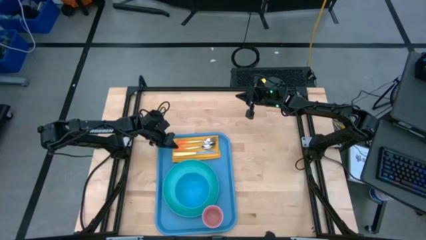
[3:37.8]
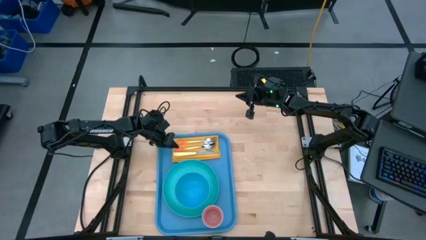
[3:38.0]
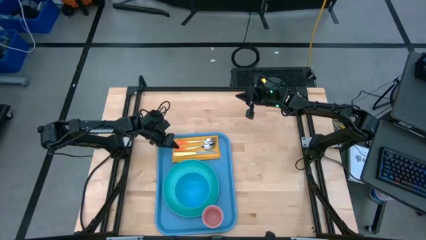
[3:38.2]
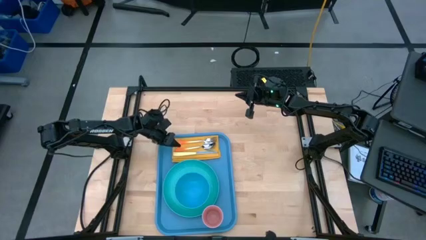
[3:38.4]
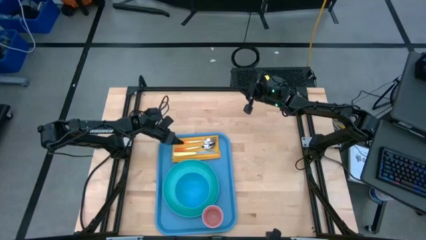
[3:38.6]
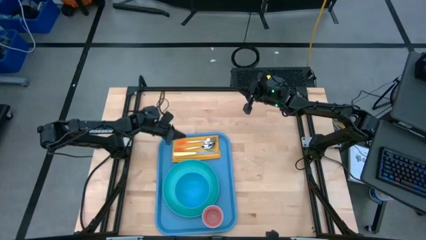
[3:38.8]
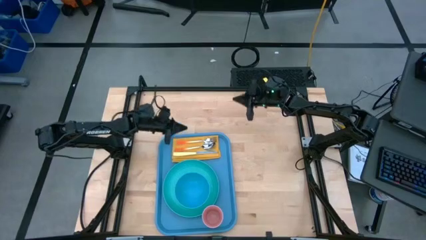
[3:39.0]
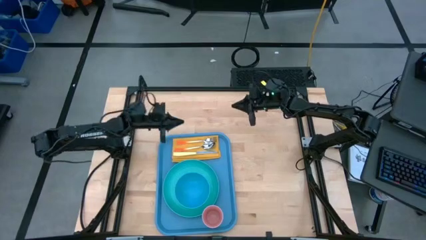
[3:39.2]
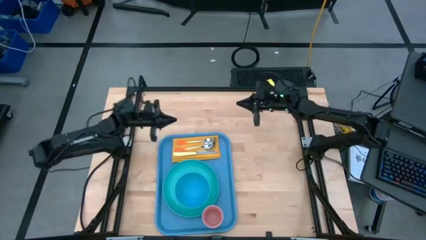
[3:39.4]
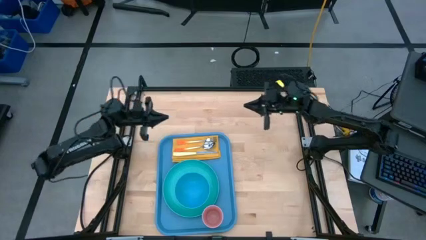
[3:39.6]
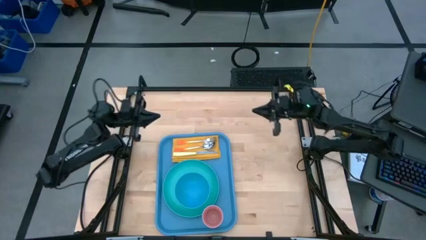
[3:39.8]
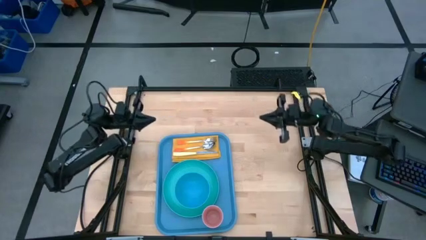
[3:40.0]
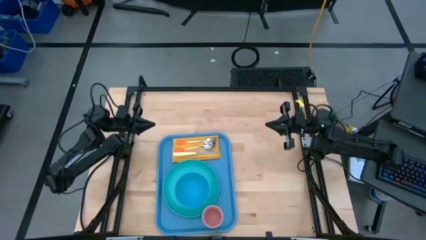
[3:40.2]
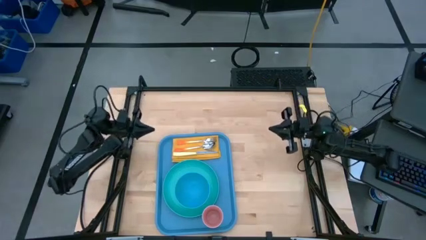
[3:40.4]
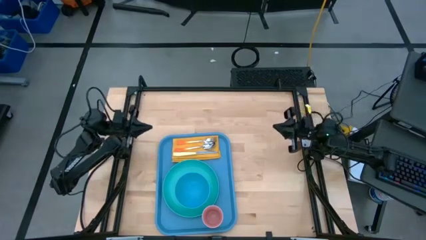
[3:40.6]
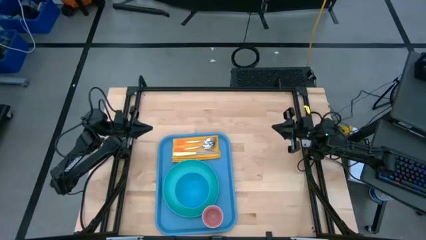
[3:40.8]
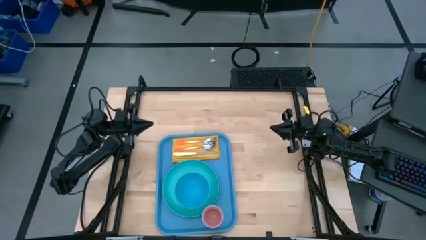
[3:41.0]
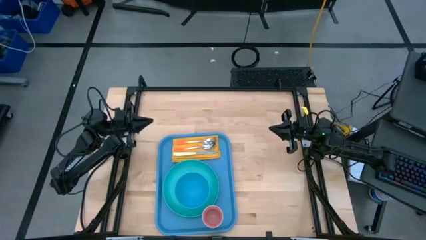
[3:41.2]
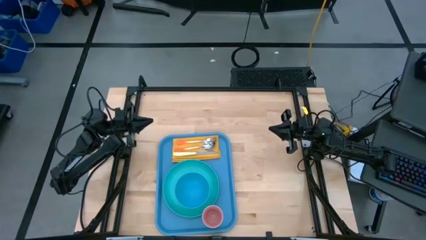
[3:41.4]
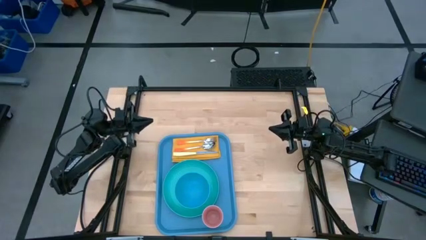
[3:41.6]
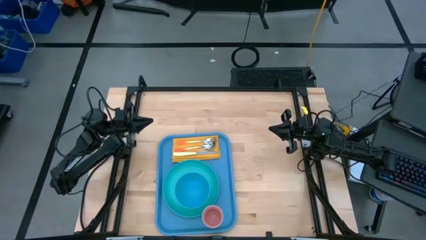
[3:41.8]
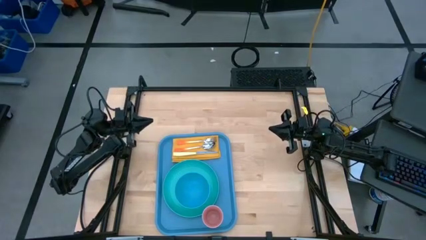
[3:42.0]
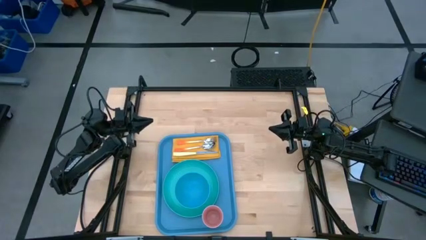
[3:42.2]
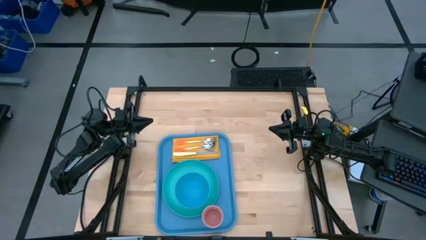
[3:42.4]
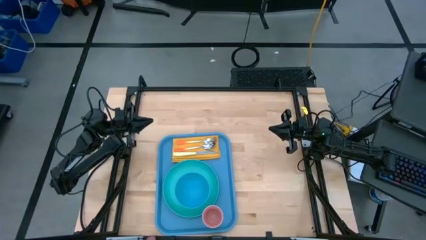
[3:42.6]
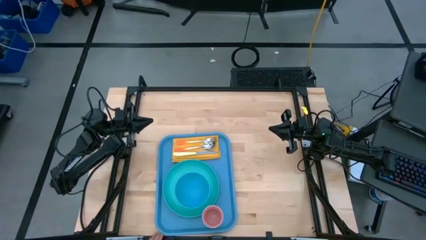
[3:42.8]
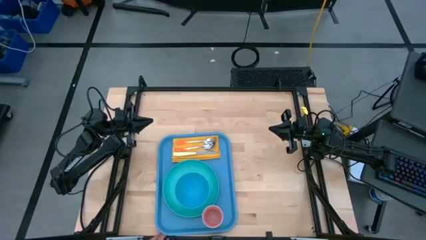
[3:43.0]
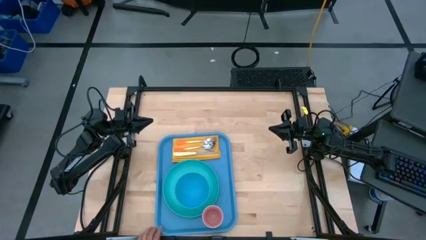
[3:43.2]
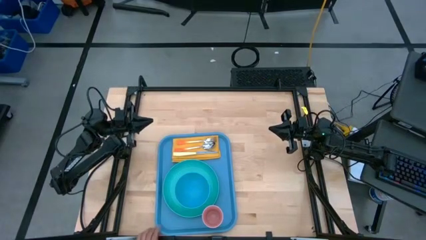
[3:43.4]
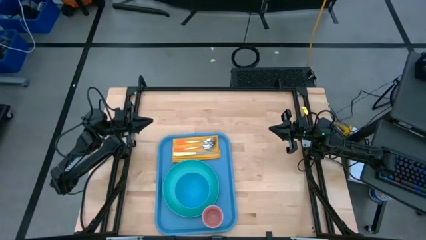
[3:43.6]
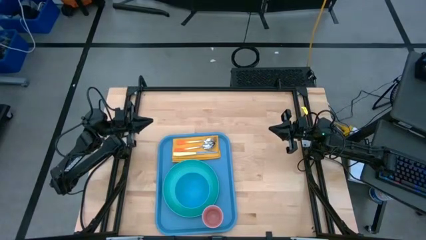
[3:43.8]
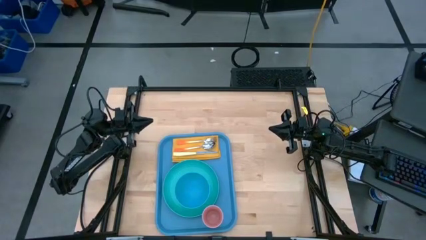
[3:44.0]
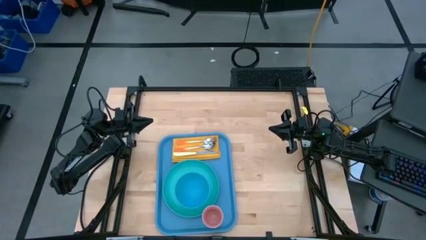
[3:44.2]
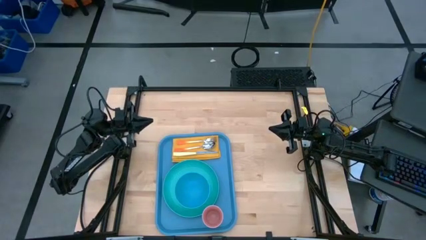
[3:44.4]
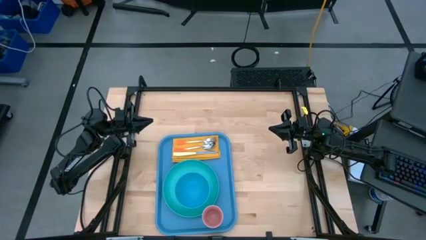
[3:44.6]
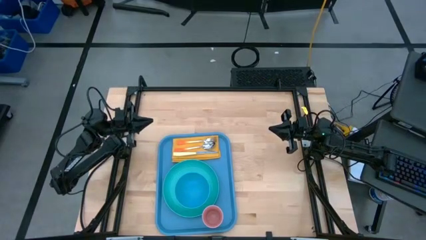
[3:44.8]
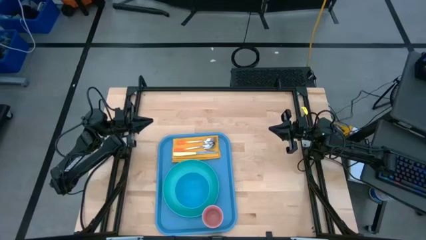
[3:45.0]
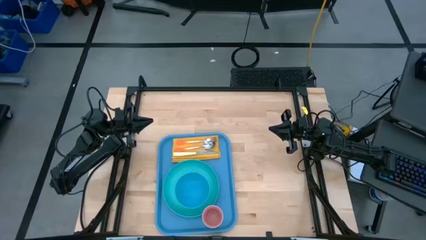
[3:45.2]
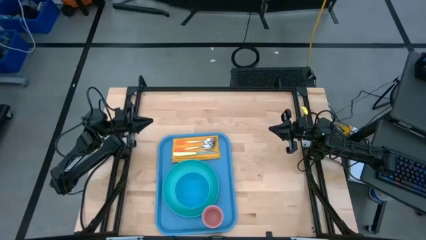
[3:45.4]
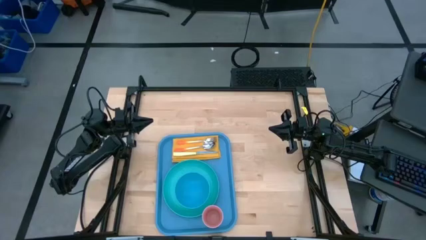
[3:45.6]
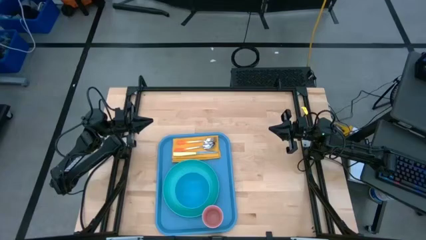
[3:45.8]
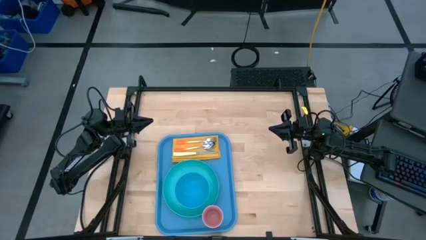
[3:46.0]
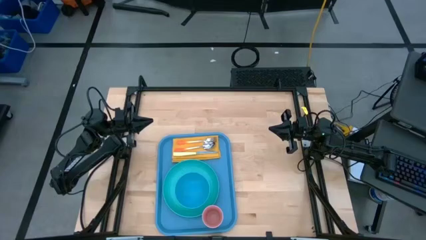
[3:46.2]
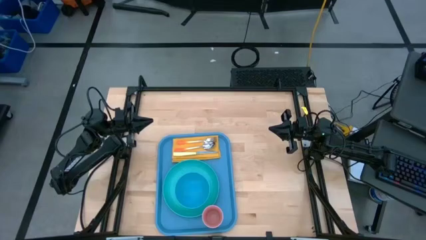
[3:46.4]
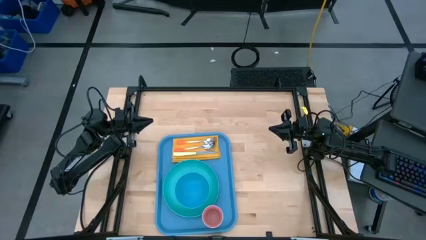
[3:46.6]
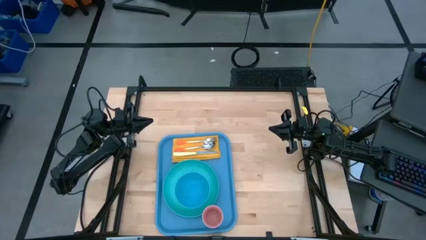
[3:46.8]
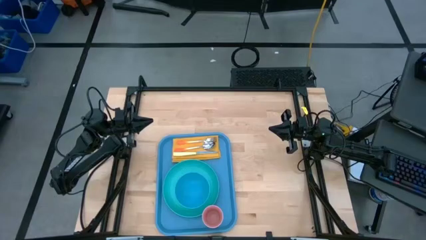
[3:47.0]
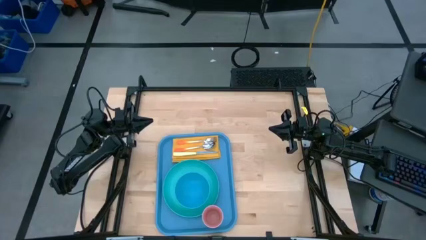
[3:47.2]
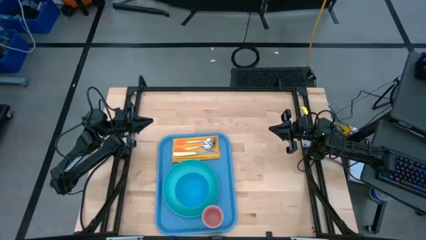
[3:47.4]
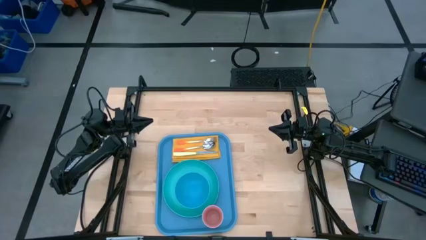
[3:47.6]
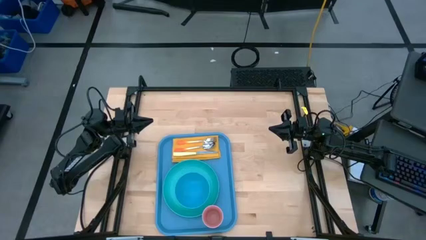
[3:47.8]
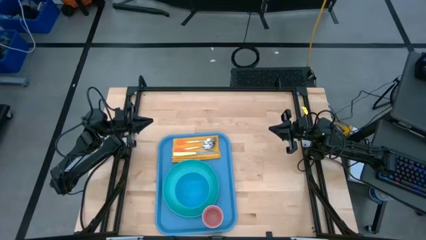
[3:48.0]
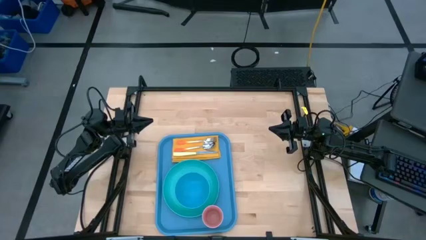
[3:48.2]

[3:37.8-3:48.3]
Task: Set up tray
Return to Home Position

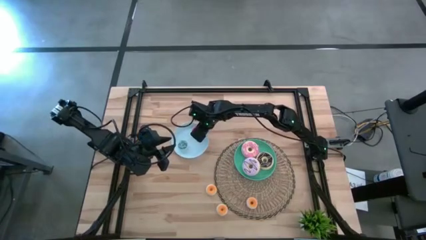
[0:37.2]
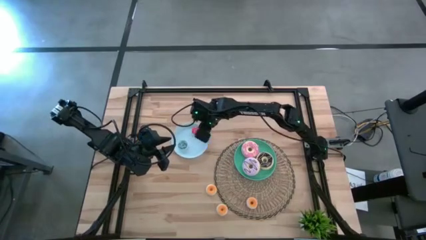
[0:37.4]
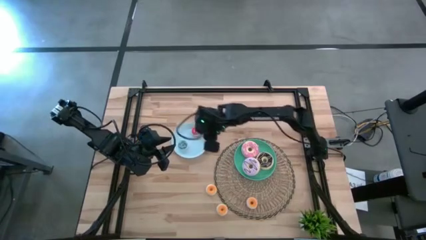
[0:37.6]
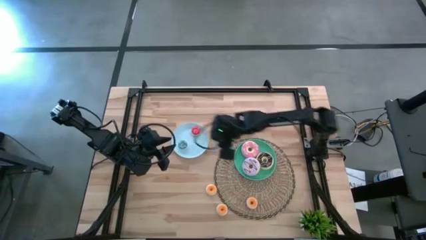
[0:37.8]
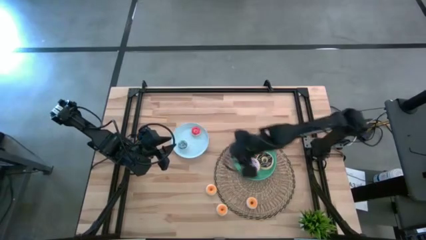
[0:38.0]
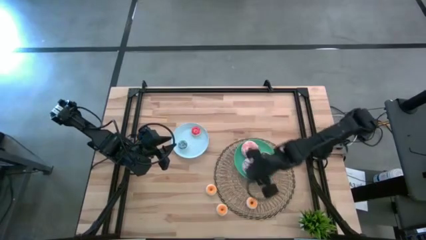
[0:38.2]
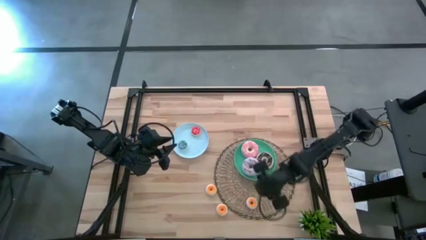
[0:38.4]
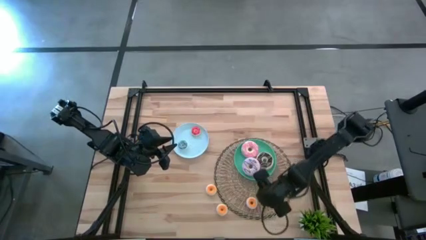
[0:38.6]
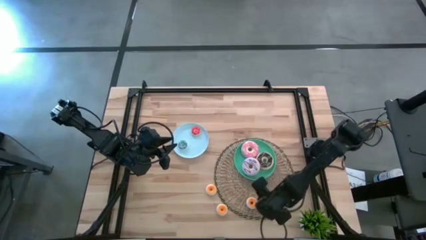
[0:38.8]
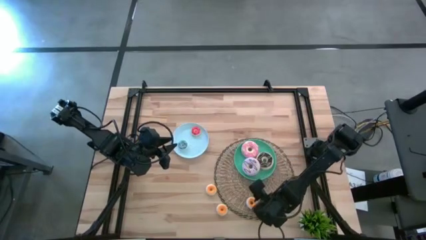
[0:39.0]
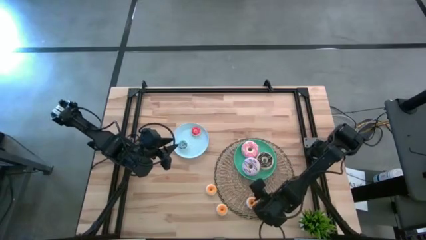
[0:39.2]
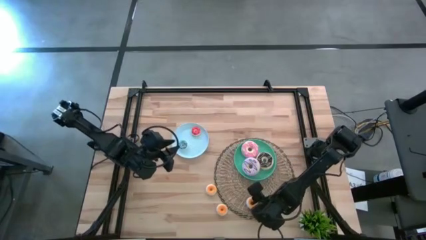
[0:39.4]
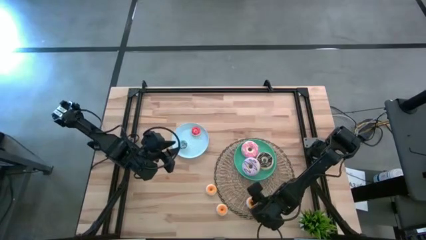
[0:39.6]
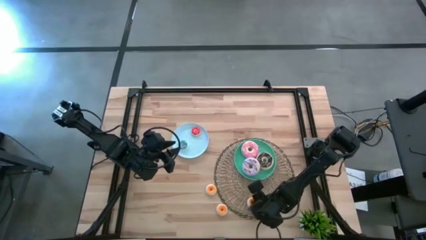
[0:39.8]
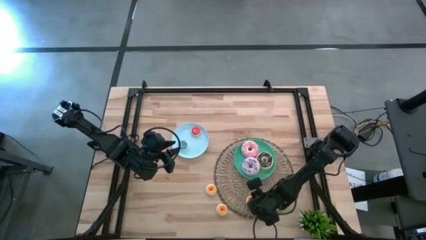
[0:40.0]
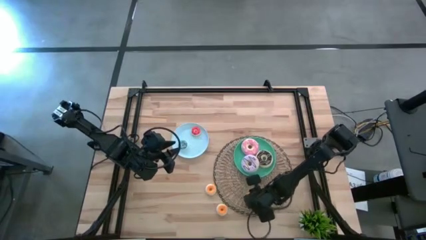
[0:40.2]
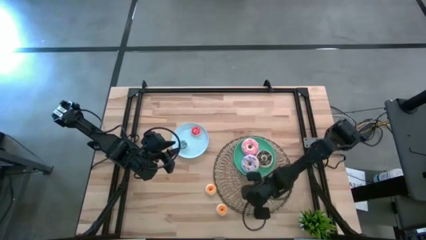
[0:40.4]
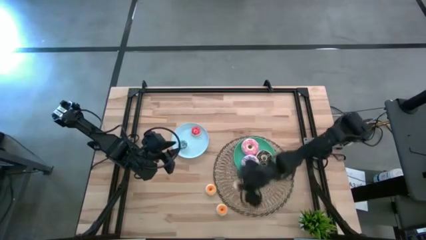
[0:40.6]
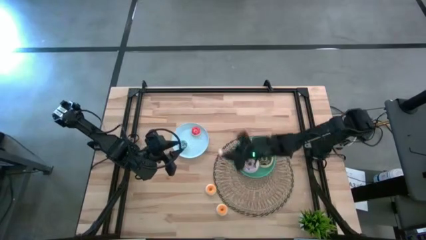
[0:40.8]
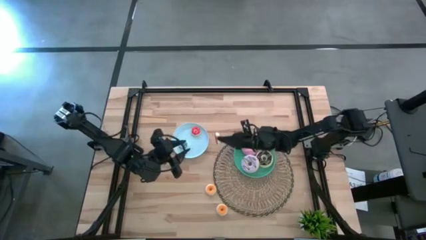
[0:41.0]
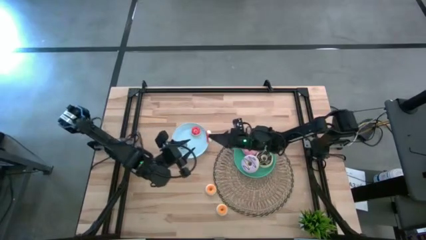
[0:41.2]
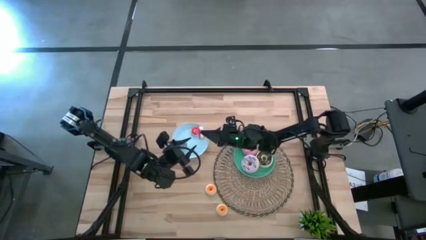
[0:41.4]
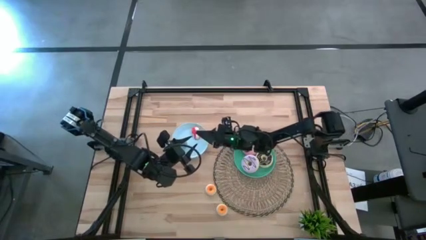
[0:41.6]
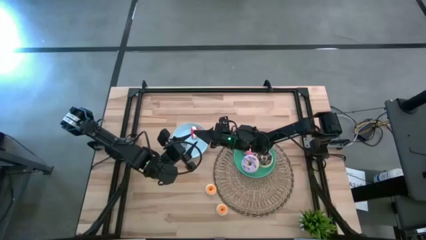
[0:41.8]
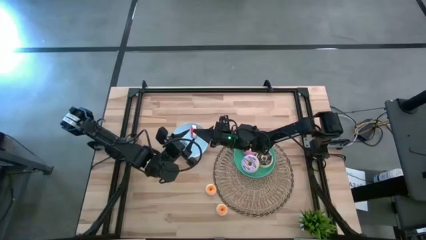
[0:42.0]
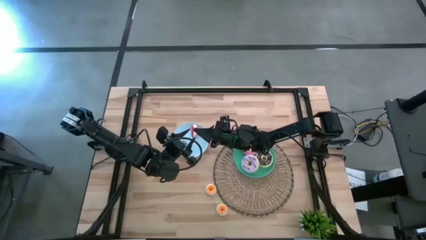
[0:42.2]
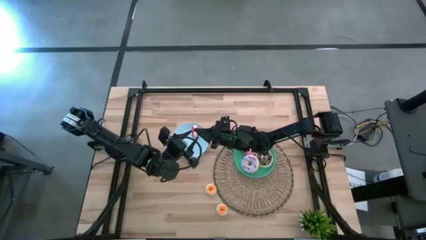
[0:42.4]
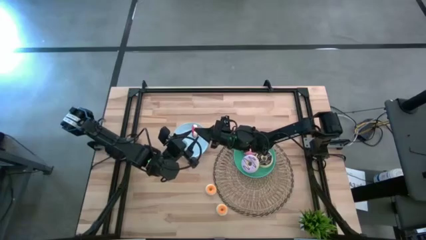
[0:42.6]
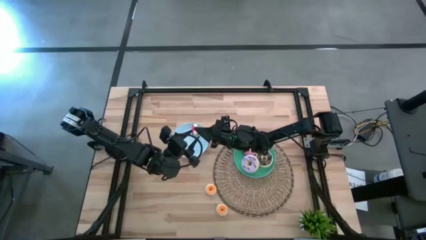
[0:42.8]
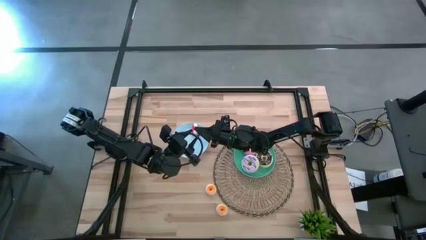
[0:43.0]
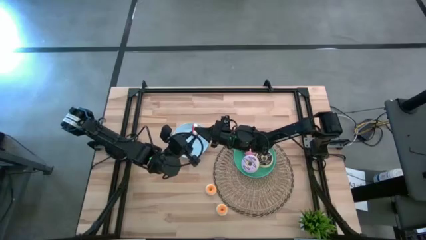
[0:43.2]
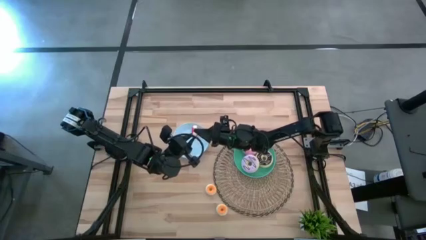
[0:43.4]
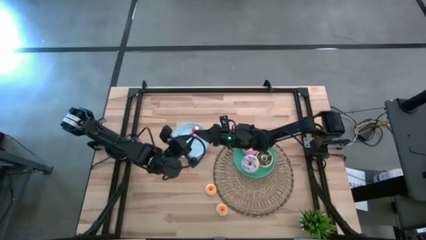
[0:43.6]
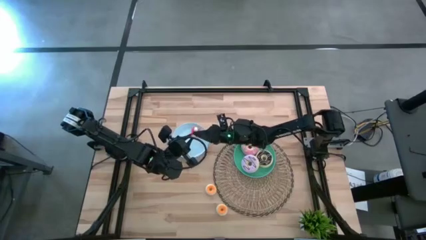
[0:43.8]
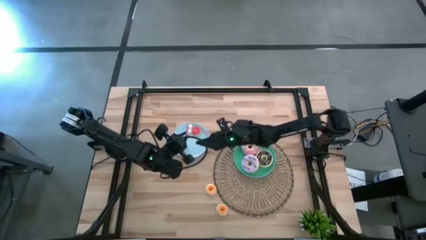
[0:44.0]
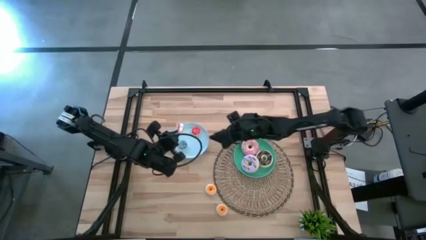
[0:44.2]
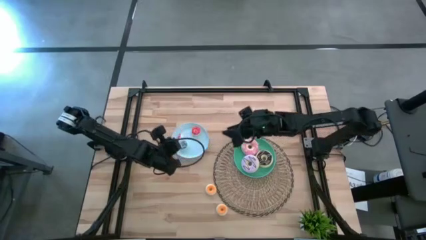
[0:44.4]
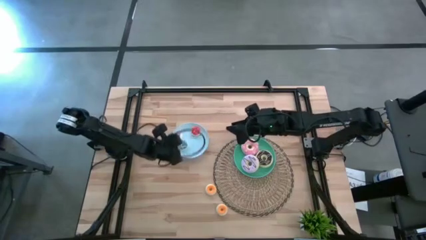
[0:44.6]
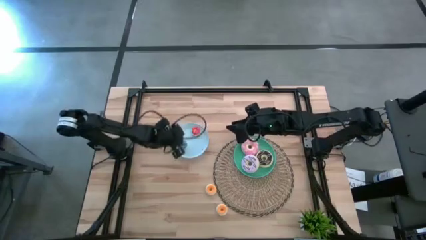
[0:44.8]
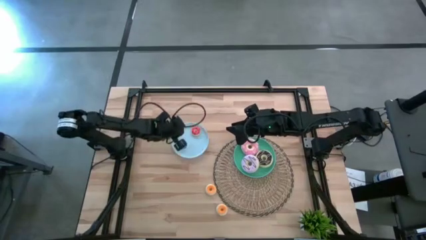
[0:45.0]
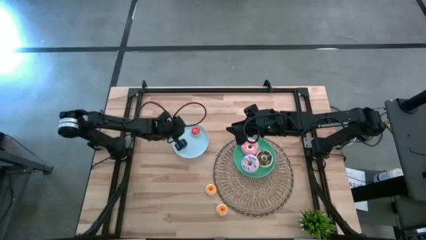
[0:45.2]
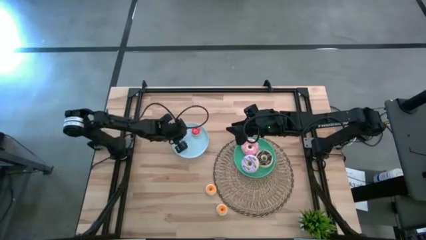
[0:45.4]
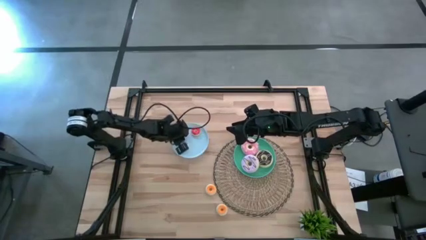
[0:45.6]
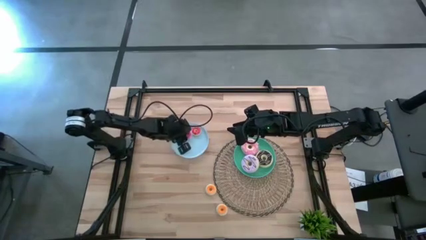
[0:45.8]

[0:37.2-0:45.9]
Task: Pick & Place donuts
Put the small dark pink donut onto the blue plate
